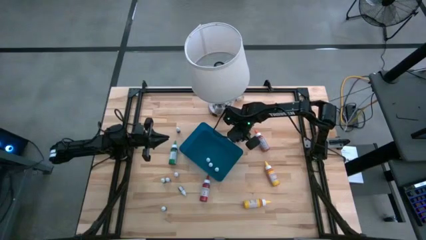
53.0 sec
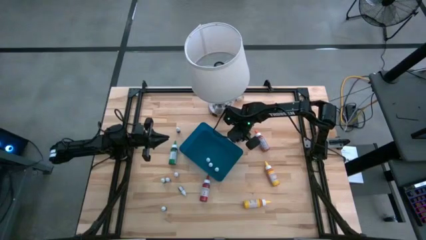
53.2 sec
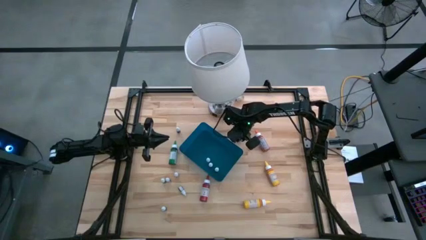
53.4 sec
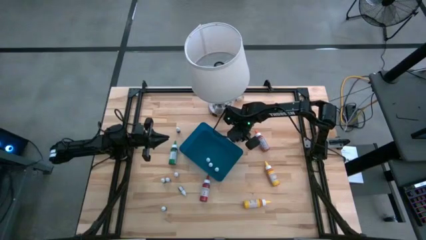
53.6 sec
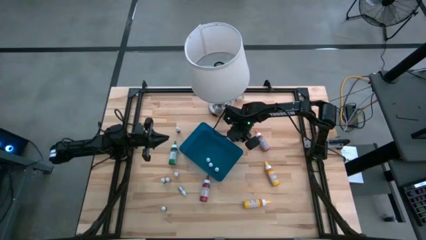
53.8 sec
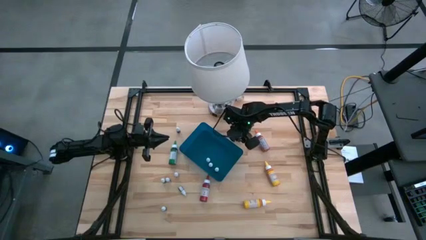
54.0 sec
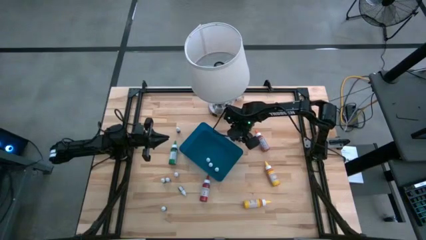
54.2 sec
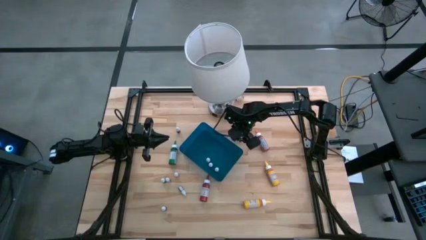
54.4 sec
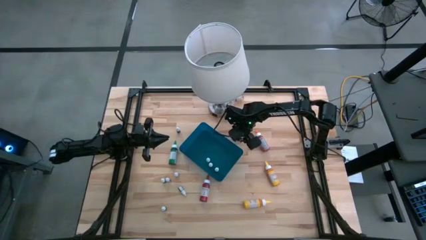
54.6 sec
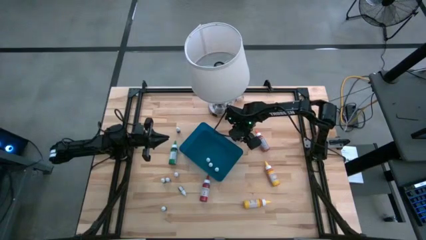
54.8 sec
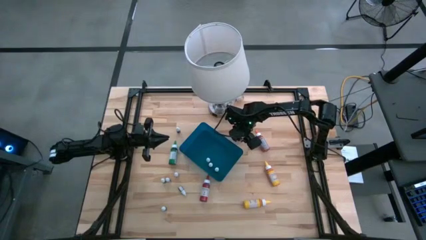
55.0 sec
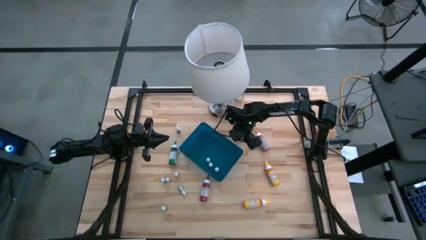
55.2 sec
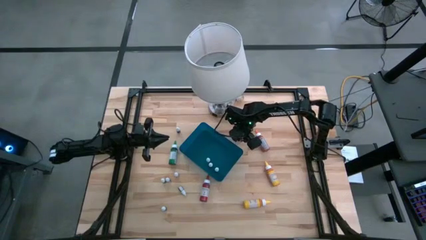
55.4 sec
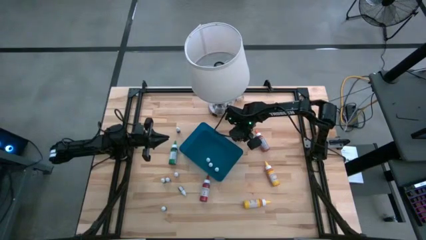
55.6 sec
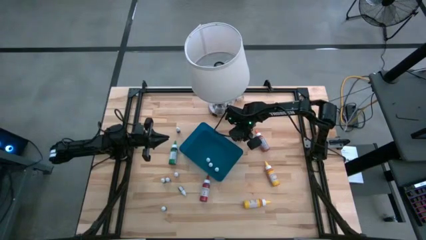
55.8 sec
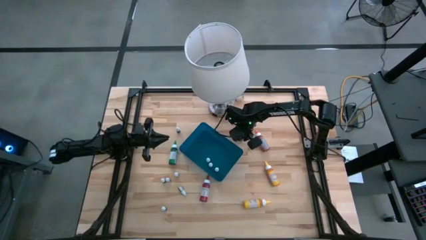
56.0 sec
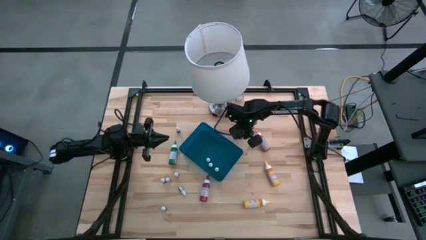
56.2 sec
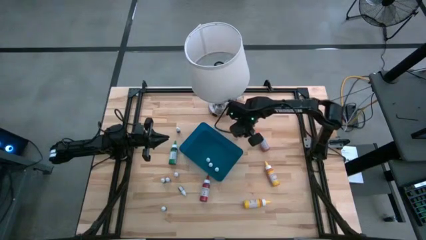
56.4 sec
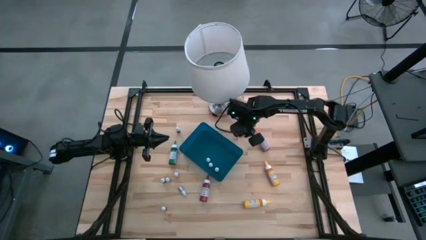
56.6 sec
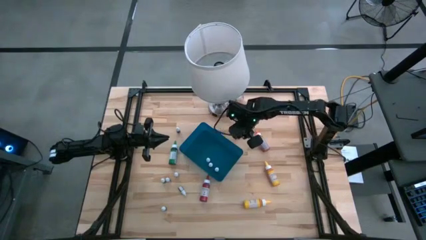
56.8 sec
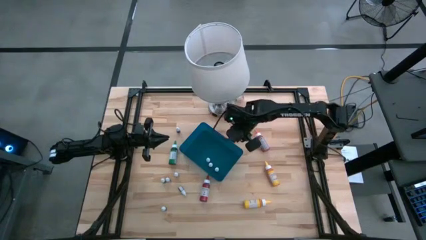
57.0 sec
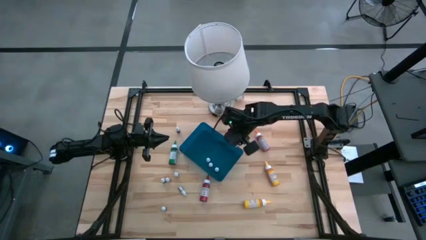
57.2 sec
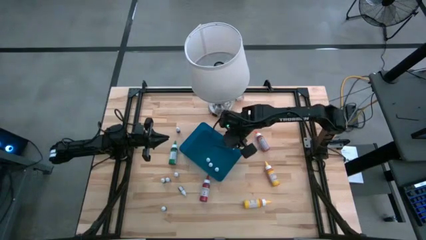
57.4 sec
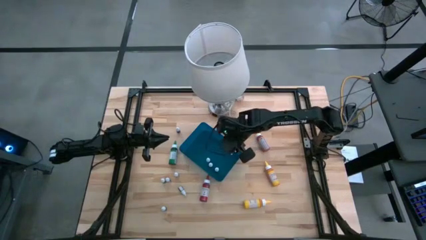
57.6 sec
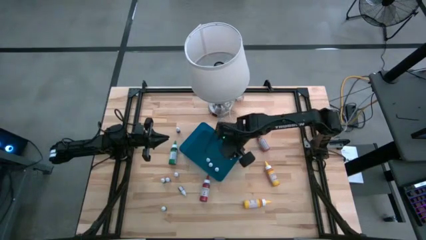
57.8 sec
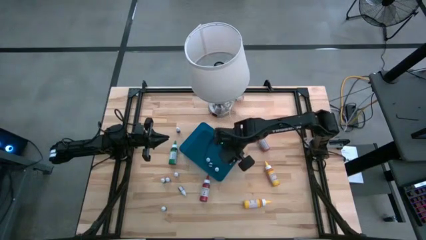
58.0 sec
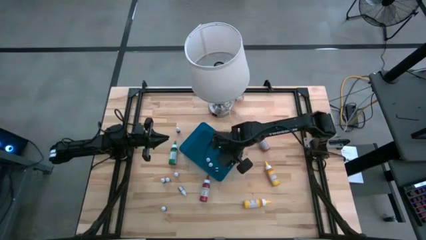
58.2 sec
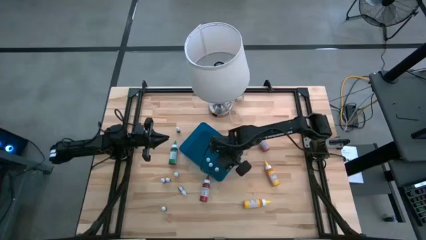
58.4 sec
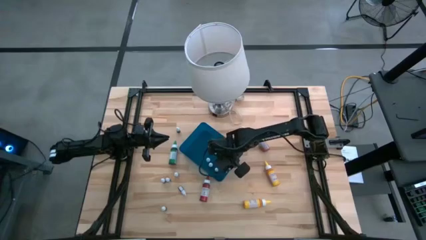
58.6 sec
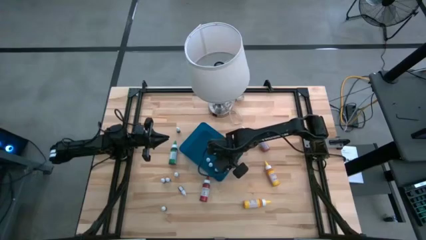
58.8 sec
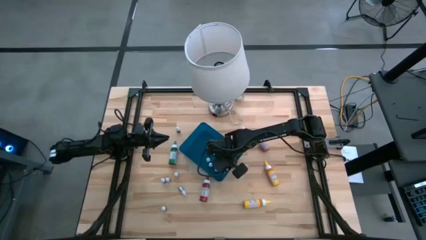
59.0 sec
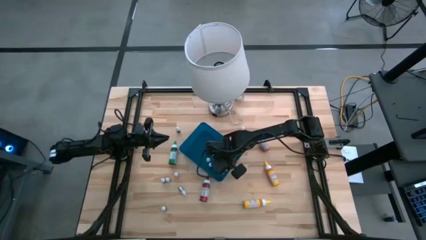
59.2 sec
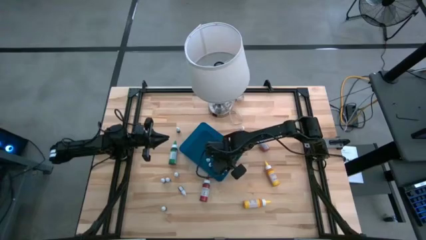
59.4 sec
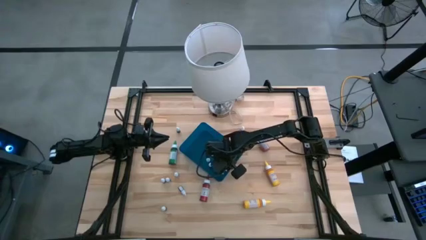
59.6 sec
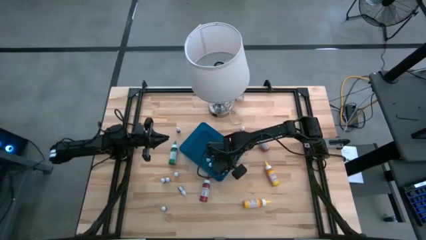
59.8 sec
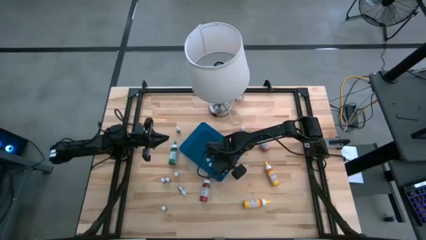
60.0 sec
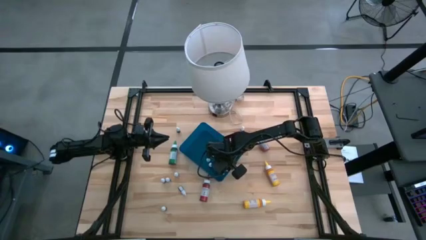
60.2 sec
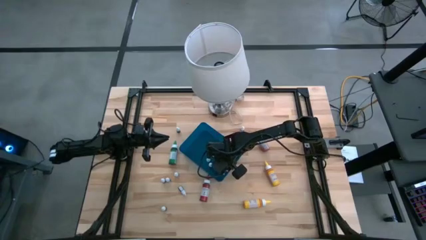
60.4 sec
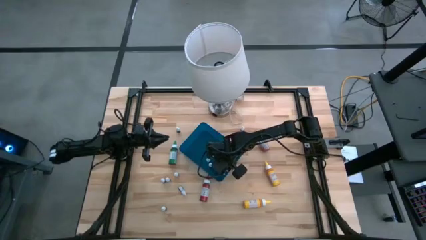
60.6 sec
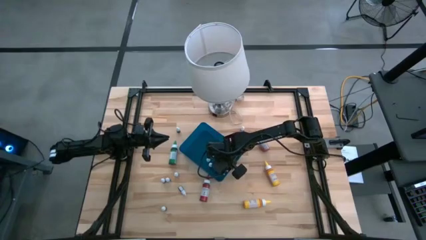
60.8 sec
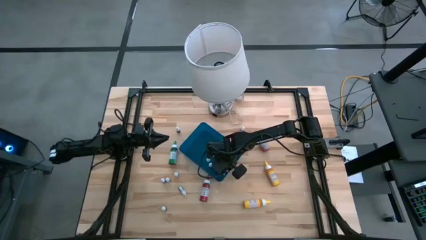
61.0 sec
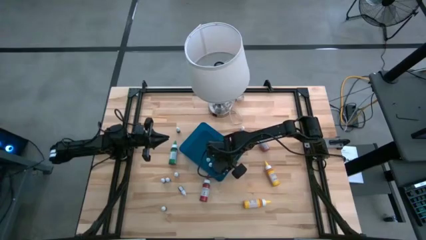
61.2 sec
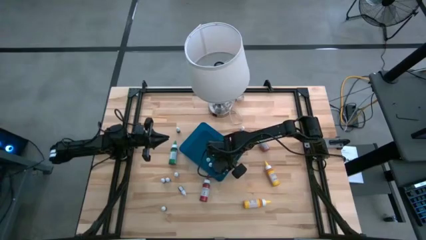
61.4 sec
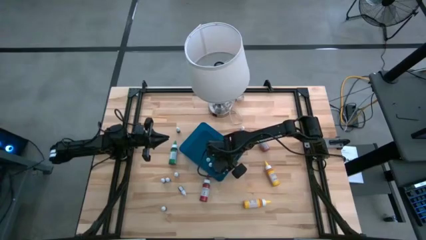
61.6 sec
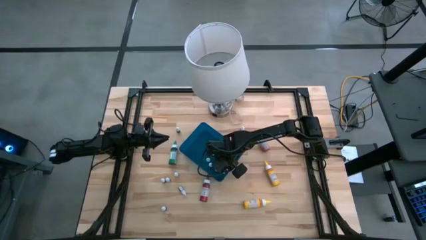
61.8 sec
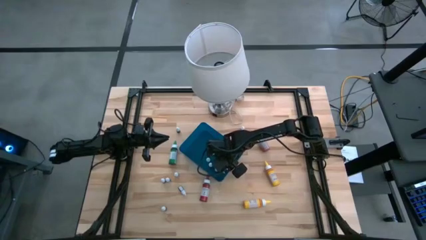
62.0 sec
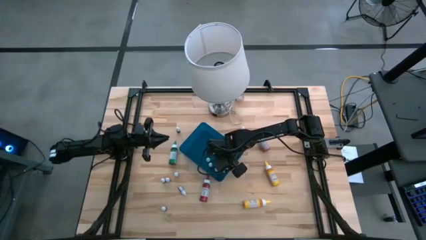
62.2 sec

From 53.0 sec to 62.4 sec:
Task: Pick & Place food coloring
Put the small red food coloring bottle into the blue container
